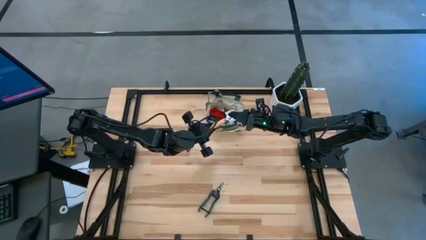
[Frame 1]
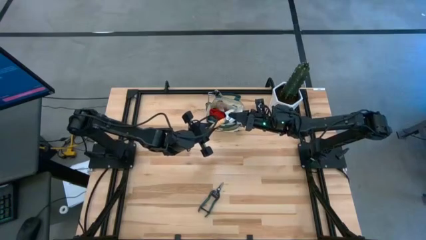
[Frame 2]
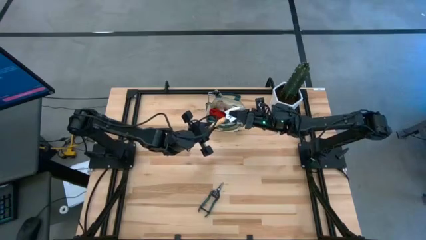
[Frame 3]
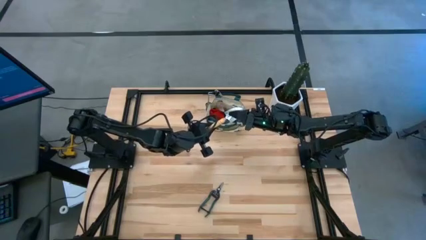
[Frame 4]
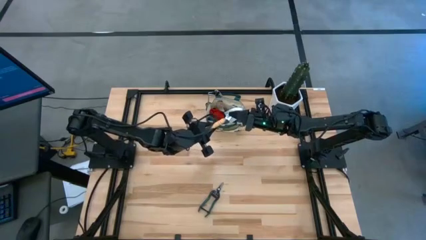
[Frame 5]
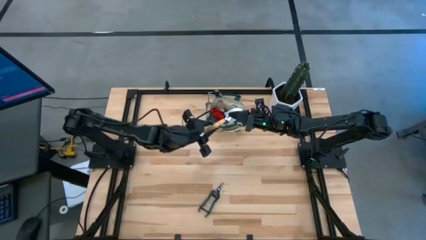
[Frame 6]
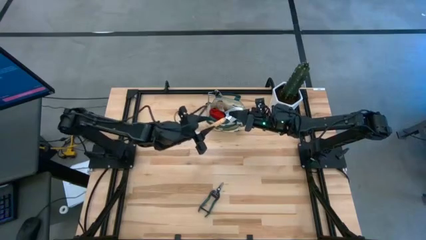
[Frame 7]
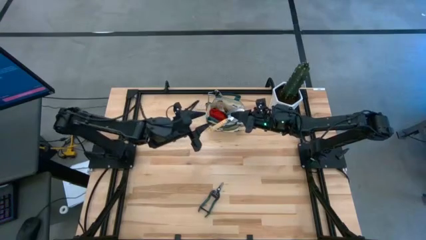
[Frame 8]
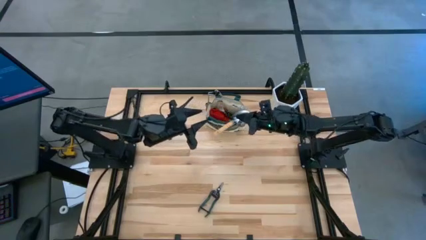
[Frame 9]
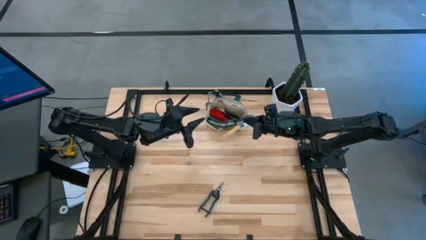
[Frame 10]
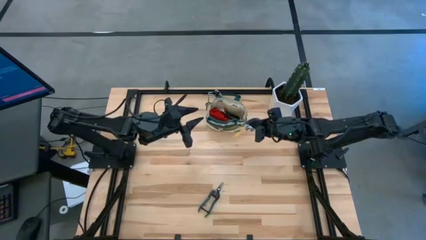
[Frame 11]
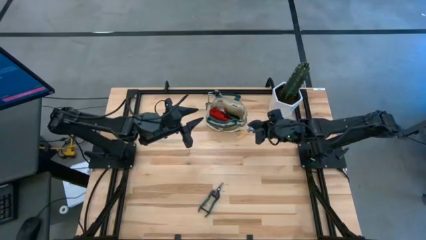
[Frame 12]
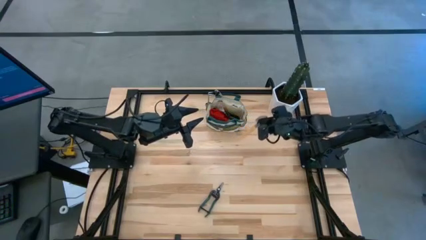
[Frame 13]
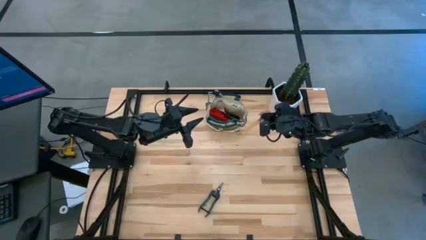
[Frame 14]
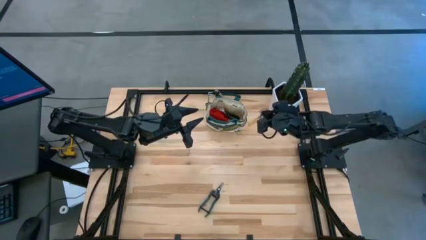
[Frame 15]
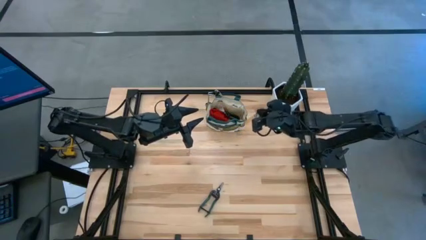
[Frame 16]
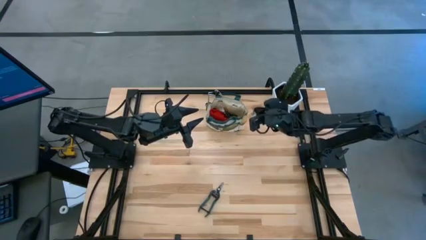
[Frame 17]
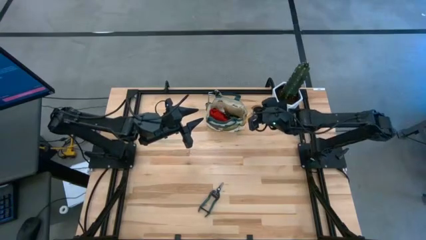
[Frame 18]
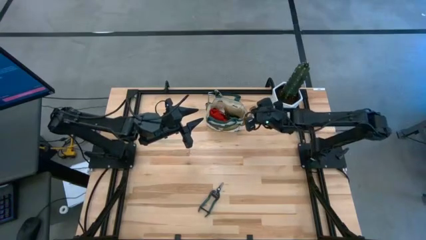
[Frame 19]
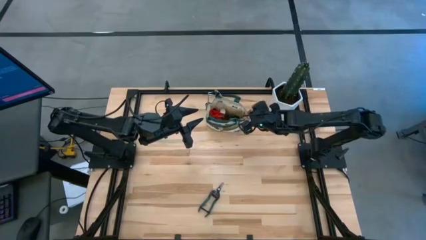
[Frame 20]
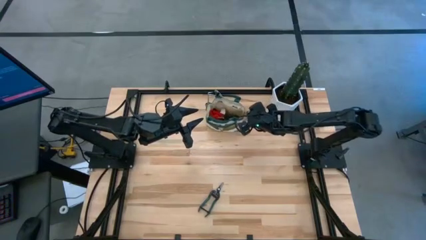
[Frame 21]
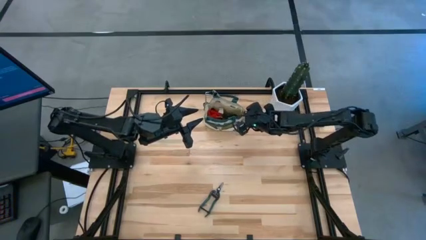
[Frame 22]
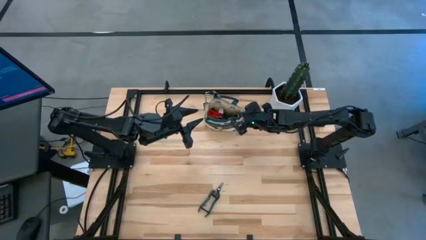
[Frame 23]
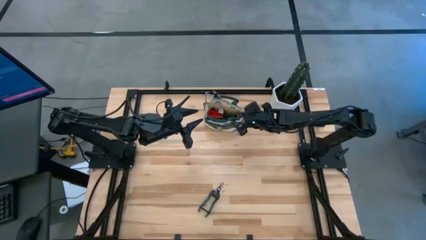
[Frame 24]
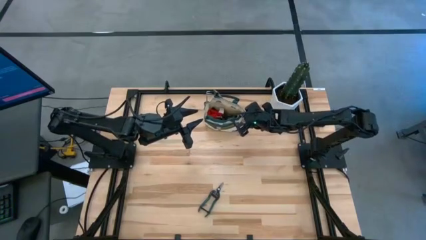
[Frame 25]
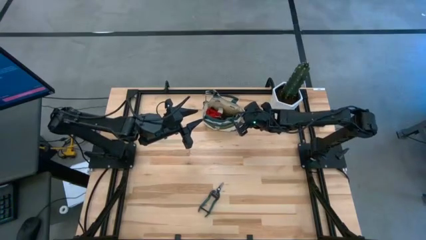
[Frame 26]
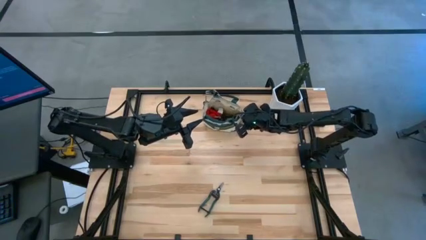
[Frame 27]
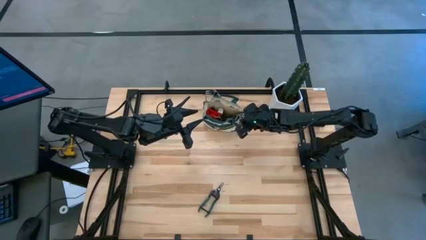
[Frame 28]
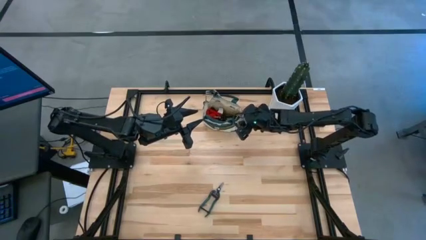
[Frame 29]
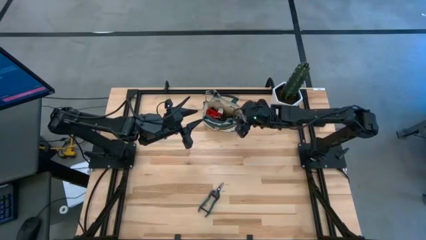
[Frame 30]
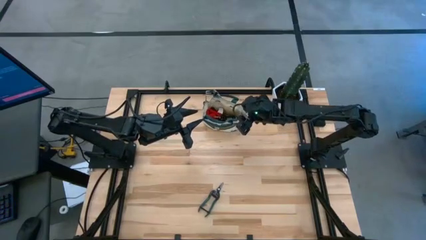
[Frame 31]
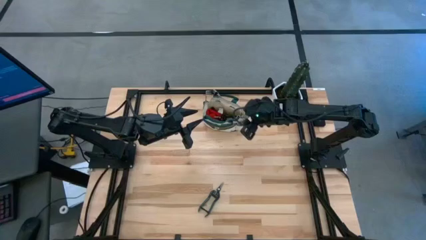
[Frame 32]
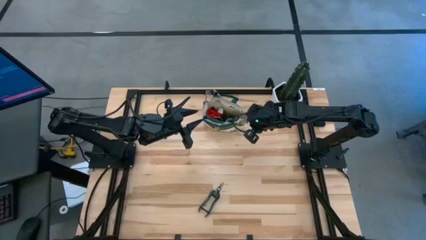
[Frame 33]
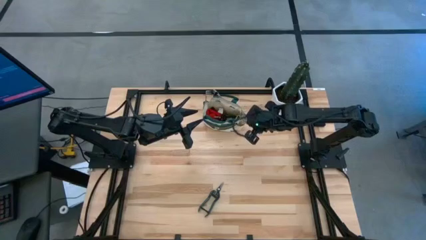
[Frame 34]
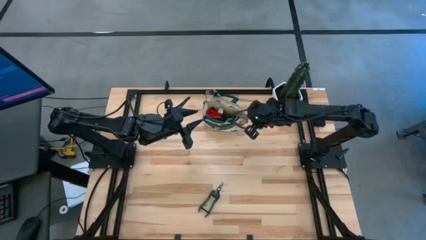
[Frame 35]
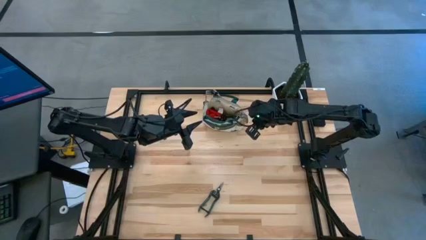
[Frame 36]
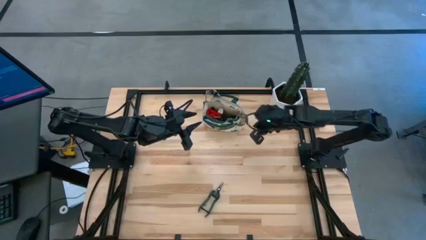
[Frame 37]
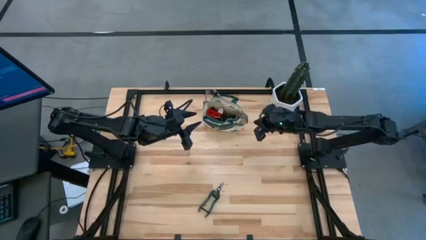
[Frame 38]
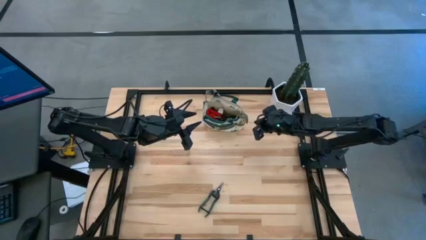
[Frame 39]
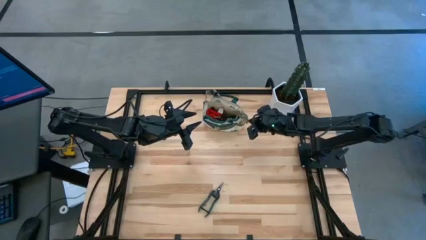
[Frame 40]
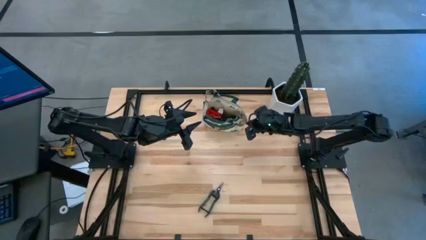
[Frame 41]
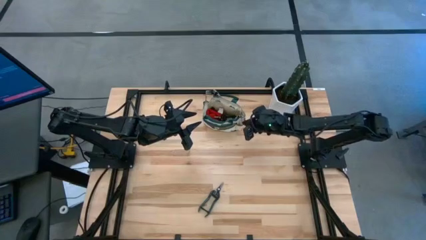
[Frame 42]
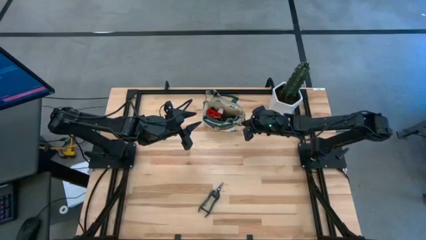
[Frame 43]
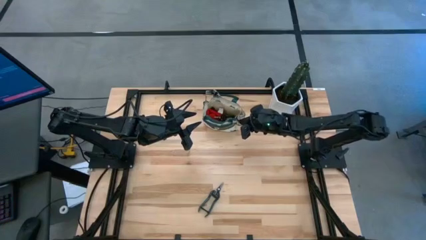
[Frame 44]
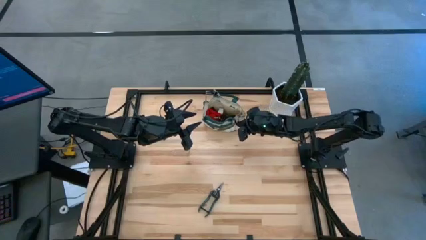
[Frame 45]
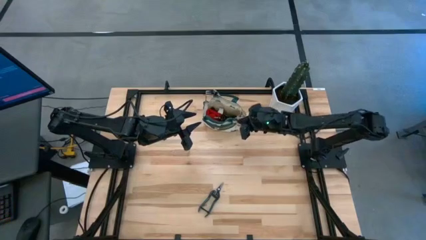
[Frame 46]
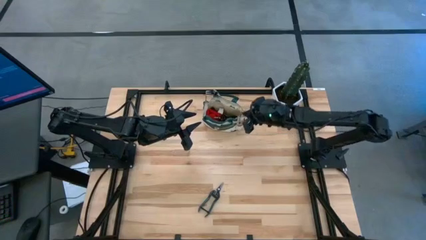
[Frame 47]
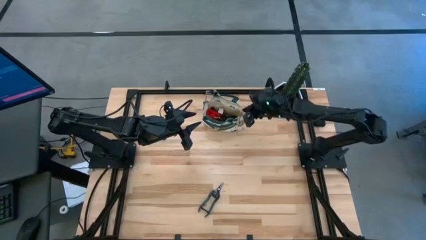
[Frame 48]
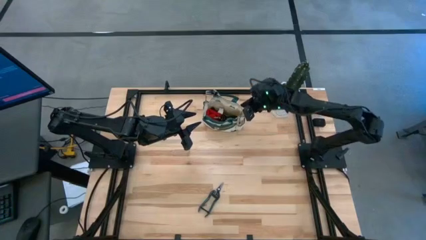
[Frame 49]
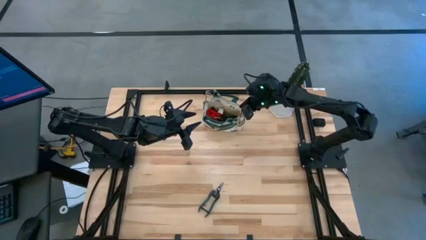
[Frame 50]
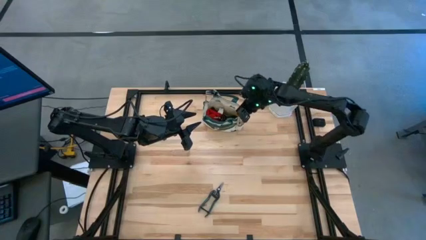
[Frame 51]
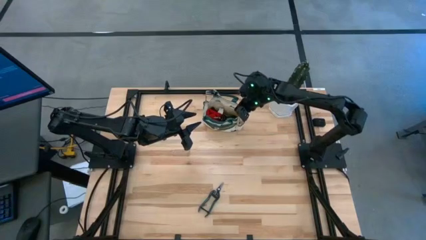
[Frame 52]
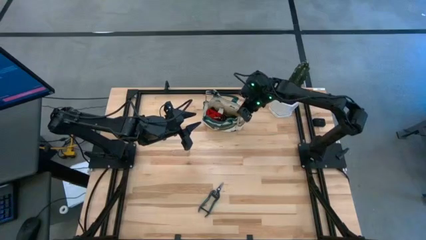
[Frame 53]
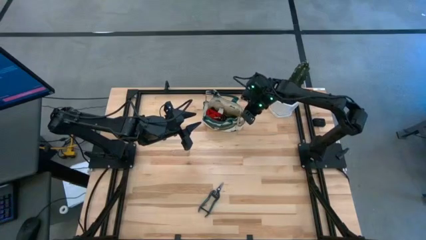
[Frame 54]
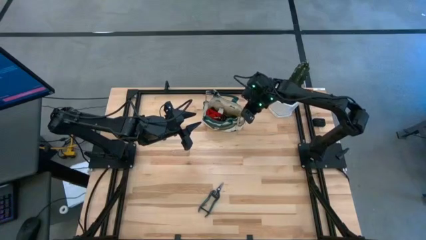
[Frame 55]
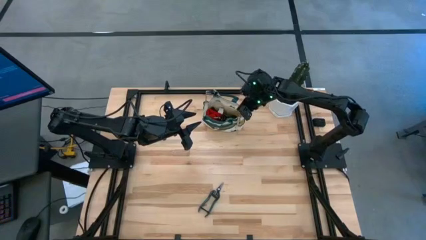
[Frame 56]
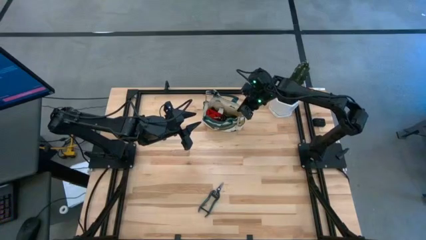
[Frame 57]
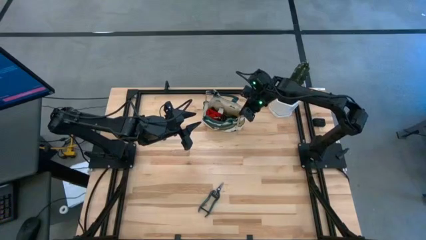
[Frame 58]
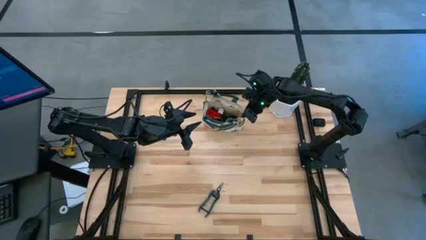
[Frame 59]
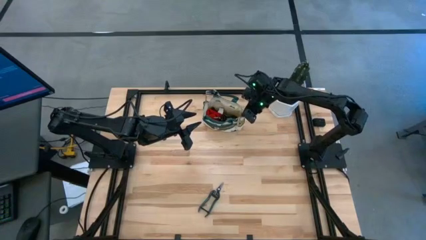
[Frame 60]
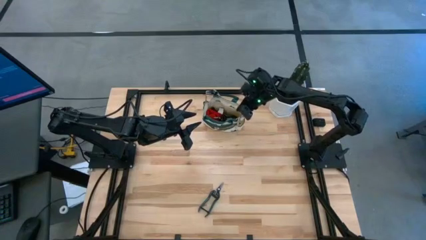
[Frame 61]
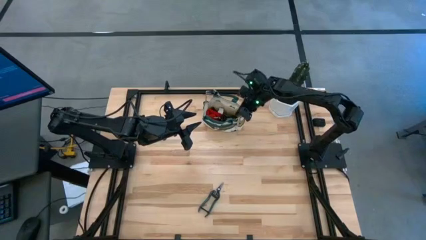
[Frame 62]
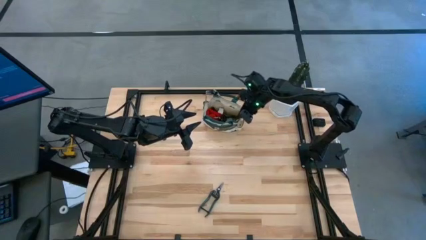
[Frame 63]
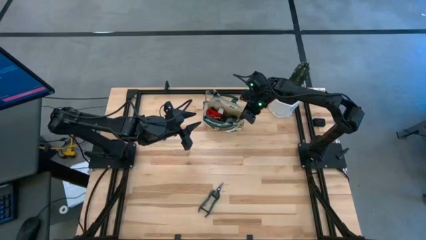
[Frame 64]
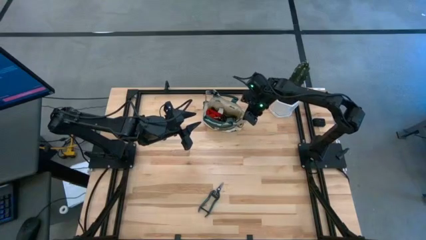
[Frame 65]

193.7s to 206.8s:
Task: Pick & Place Garden tools in Gardening bag
Put the brown trowel into the brown gardening bag
